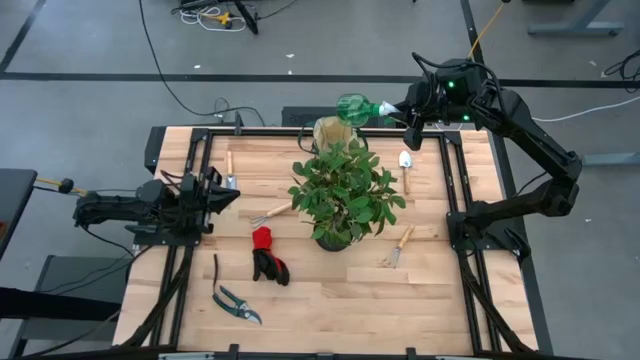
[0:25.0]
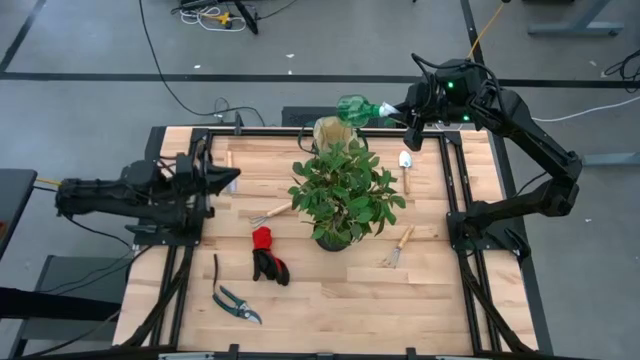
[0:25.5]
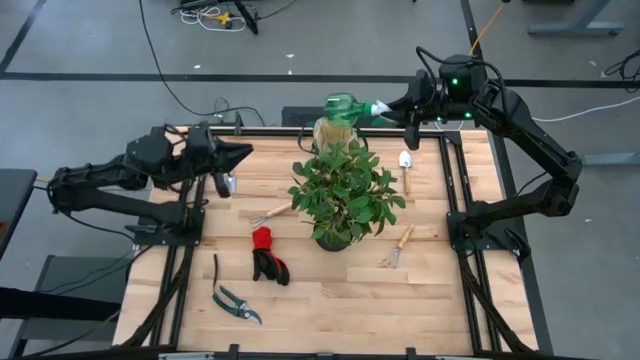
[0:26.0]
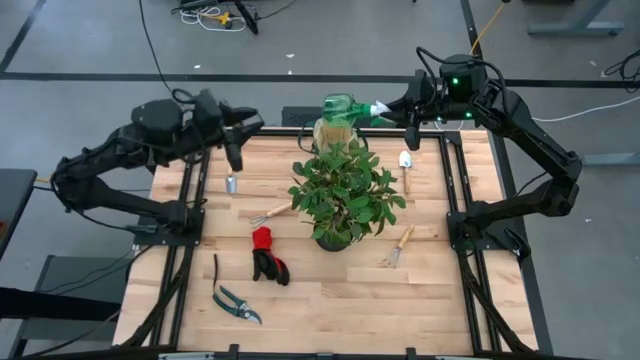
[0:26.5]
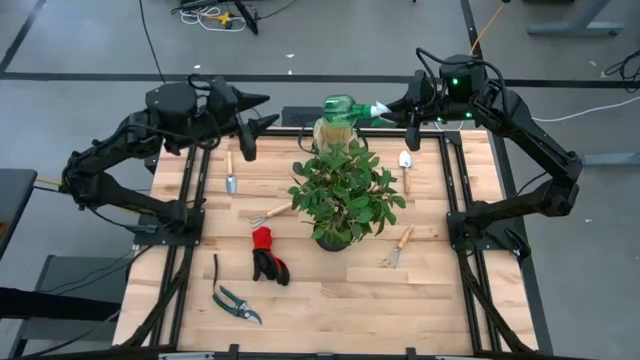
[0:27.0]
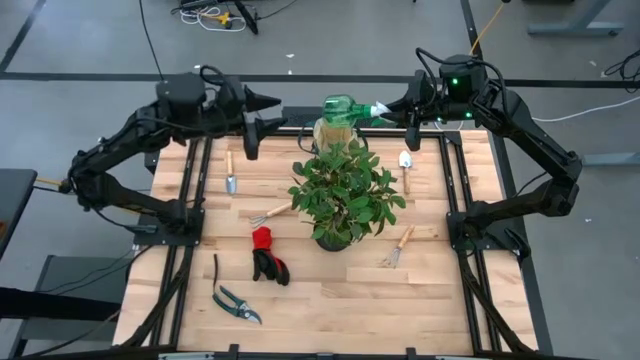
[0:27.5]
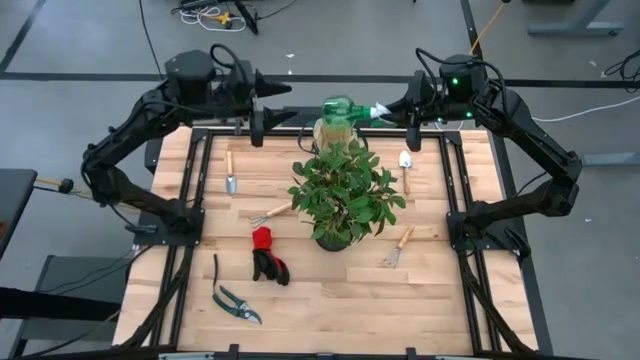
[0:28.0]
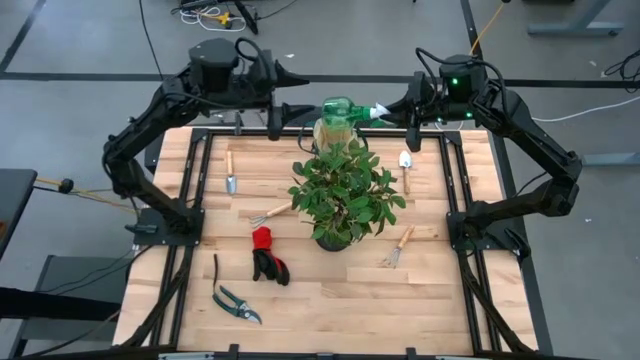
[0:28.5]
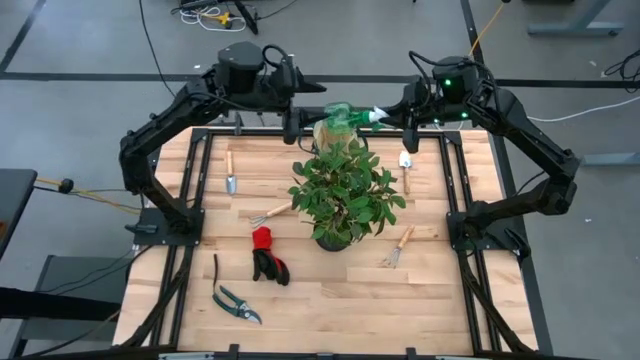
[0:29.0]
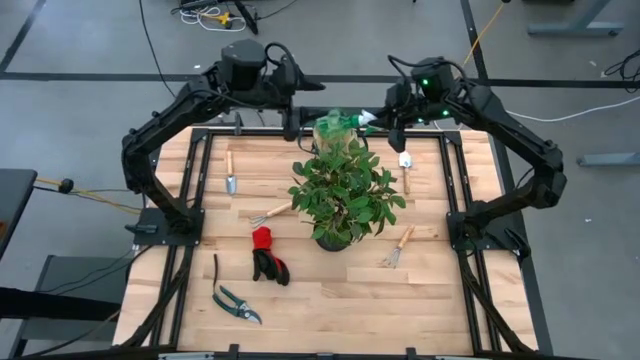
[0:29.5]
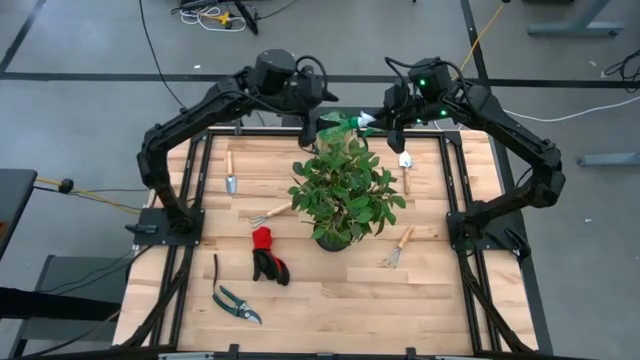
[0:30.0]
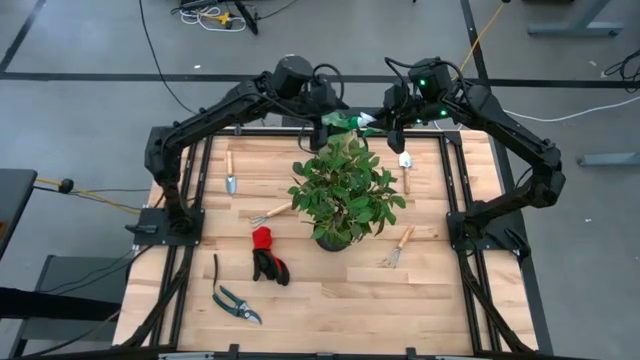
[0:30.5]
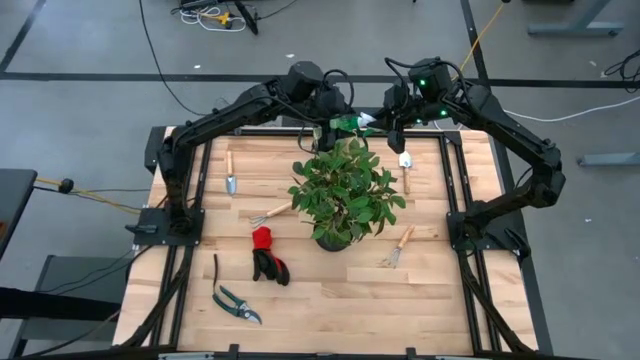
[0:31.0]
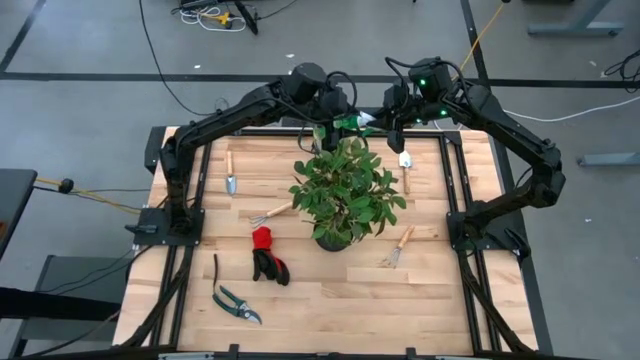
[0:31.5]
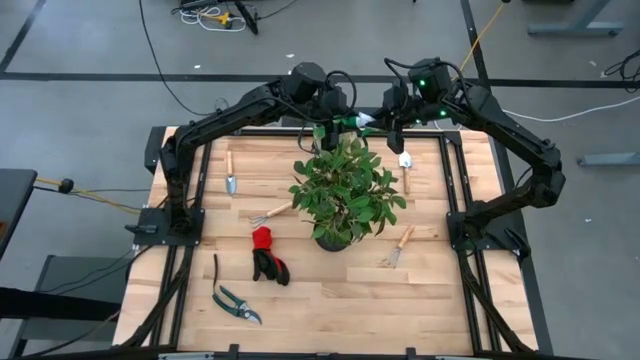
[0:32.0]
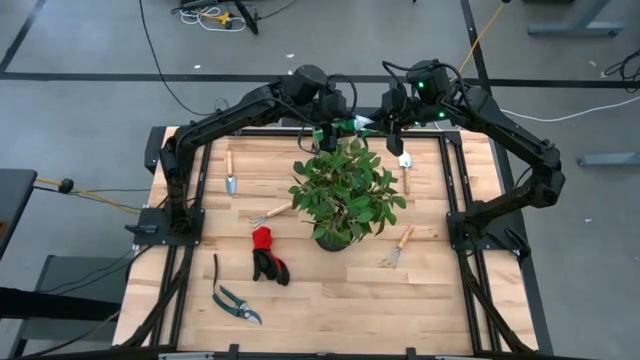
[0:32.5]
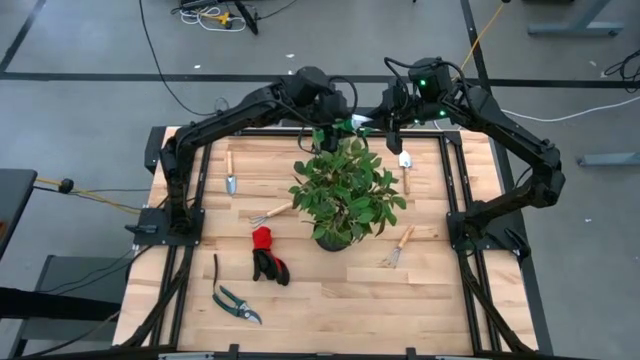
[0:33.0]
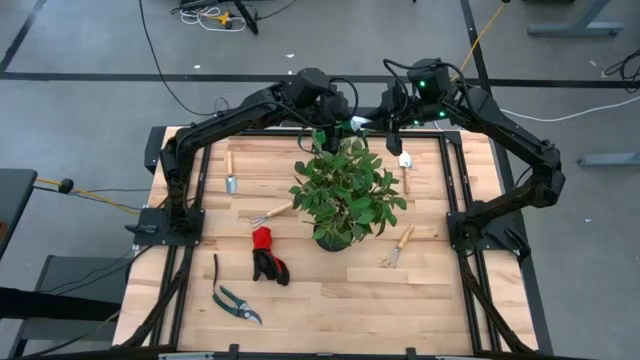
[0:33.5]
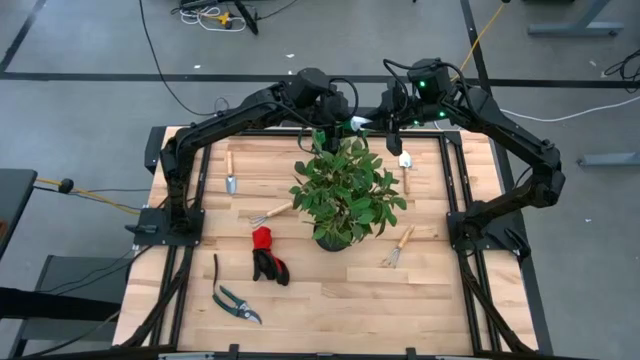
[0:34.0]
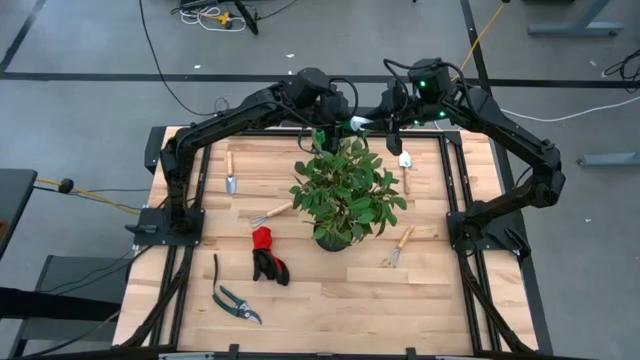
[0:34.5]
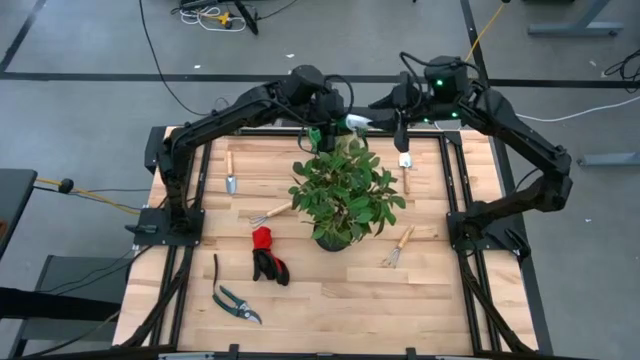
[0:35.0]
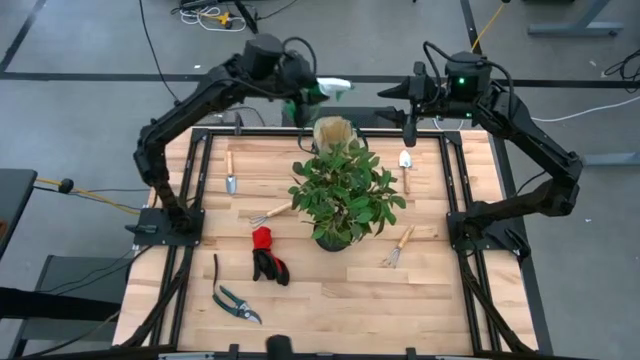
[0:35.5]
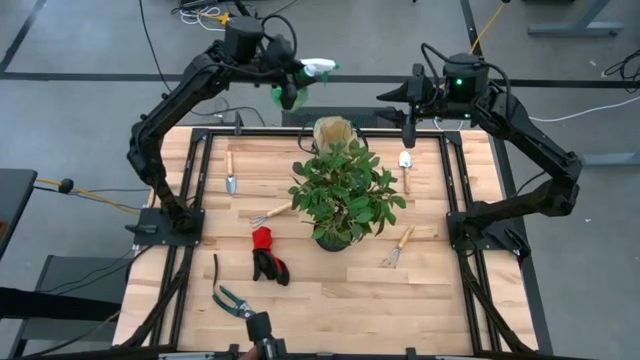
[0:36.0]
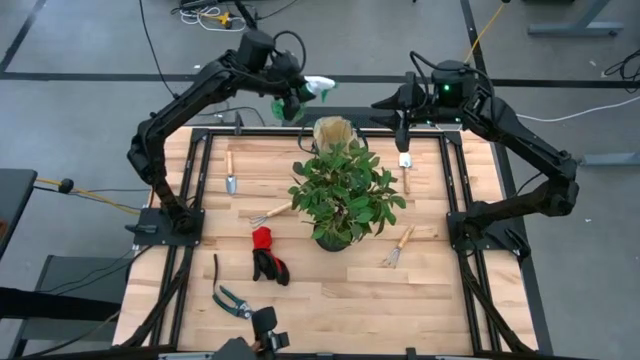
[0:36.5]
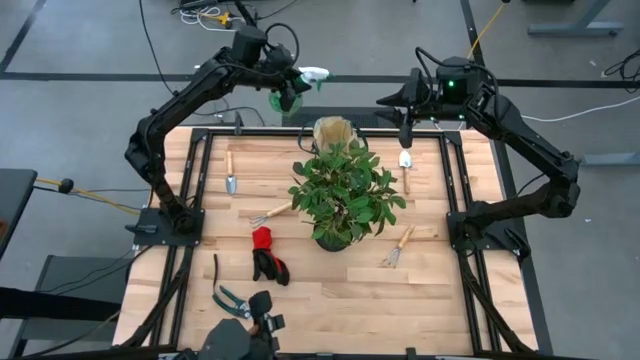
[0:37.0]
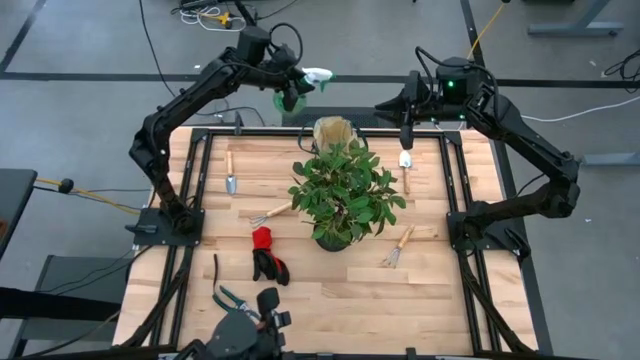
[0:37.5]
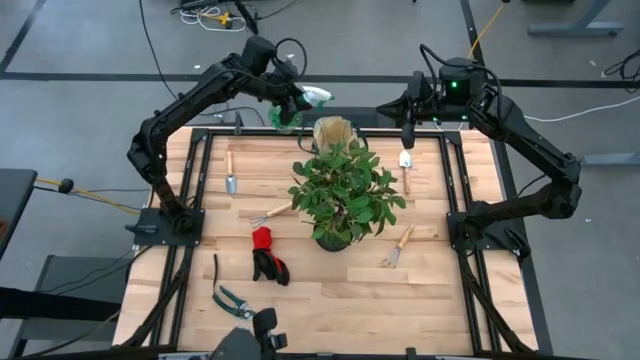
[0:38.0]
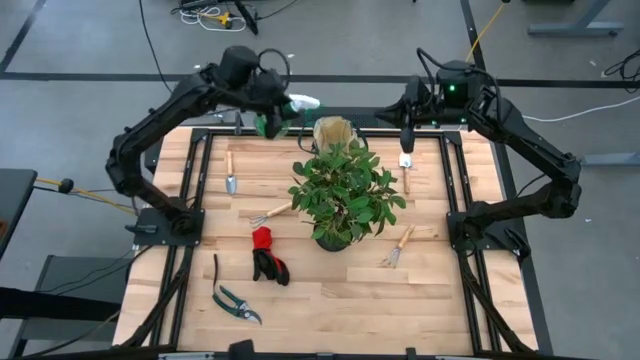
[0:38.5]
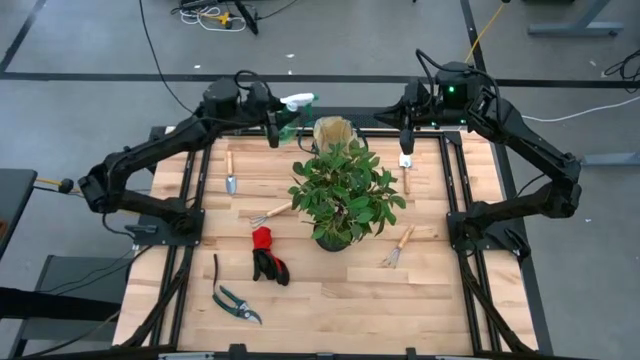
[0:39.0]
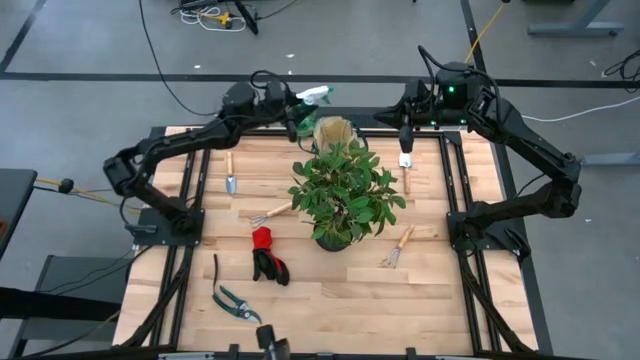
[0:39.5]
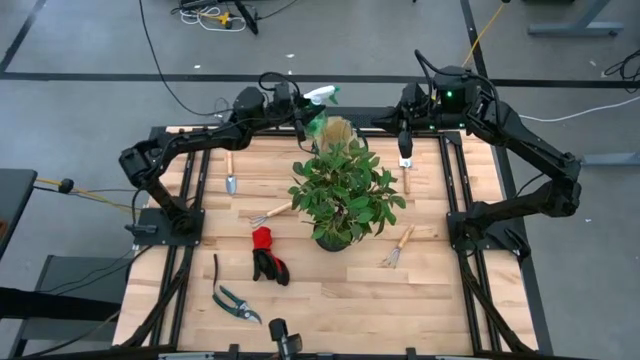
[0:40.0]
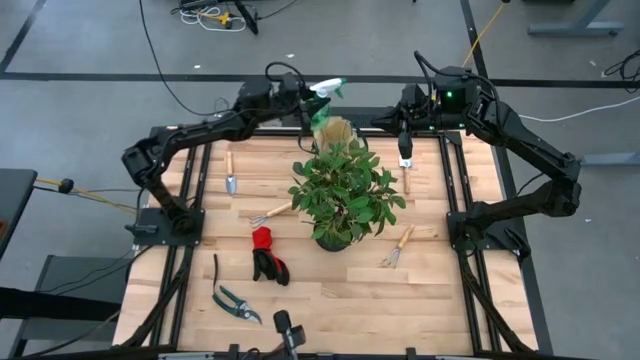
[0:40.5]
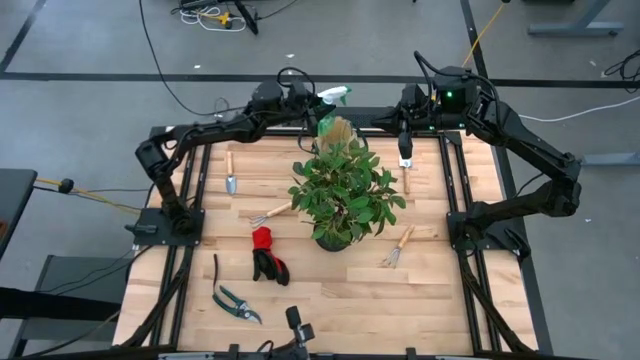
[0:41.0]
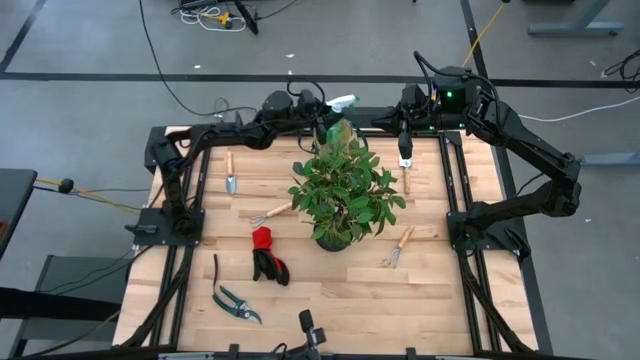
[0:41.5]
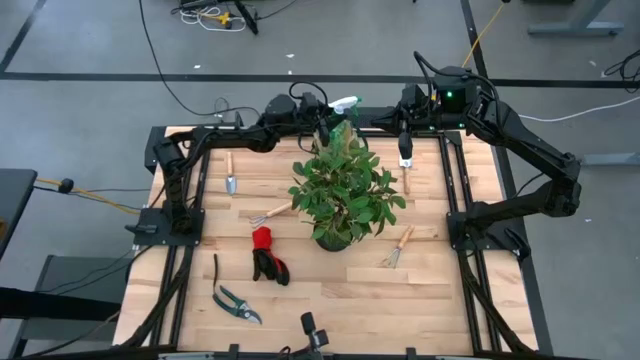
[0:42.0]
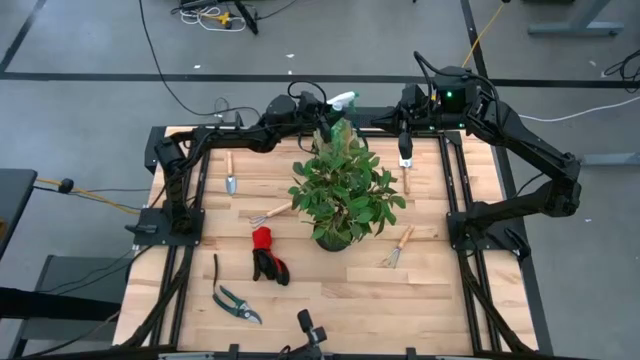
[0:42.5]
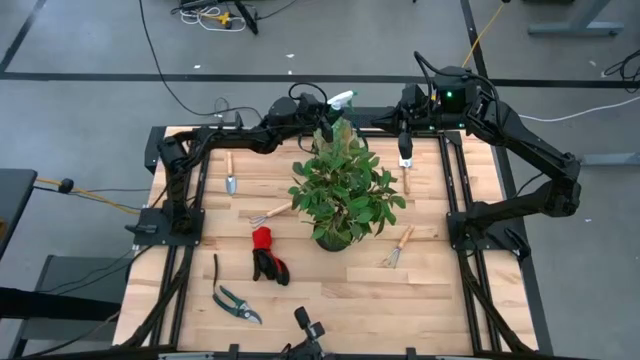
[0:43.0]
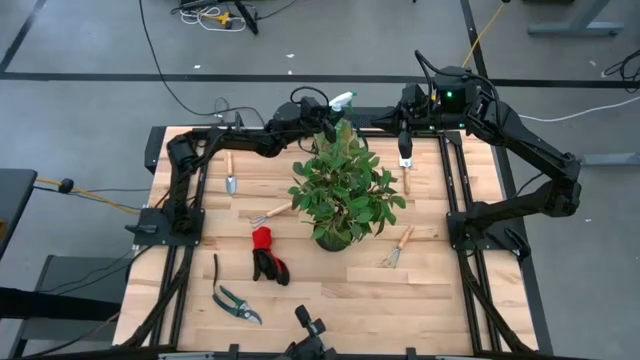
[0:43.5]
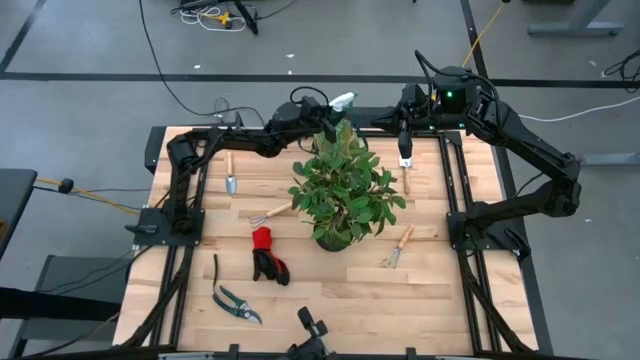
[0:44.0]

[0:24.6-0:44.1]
Task: Pick & Place Garden tools in Gardening bag
Put the green spray bottle into the gardening bag

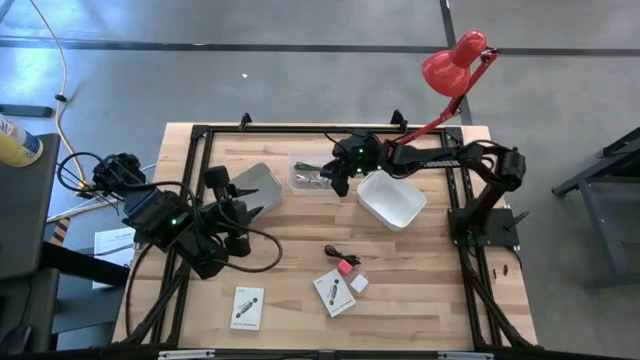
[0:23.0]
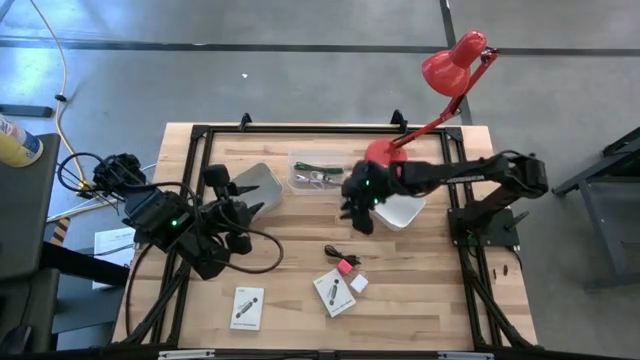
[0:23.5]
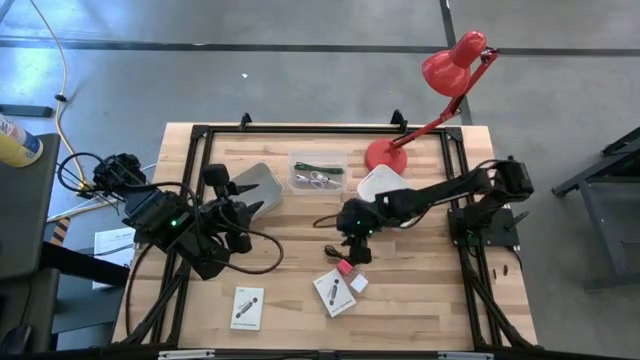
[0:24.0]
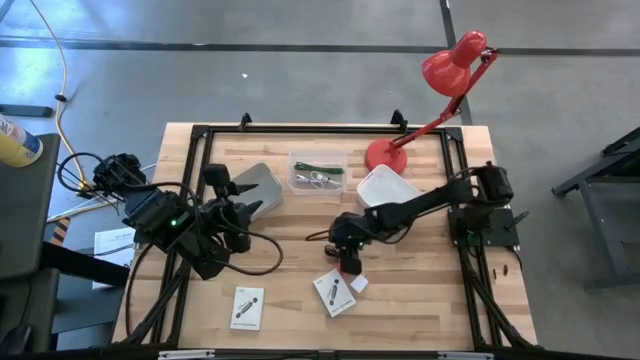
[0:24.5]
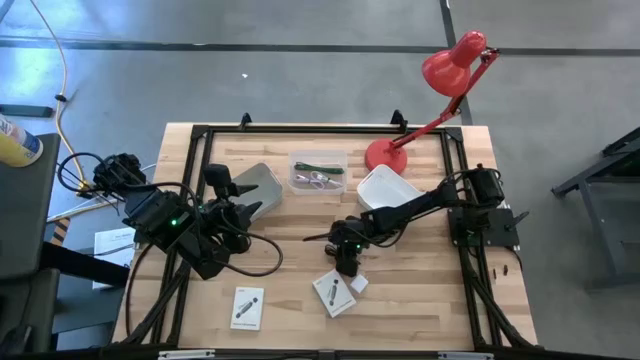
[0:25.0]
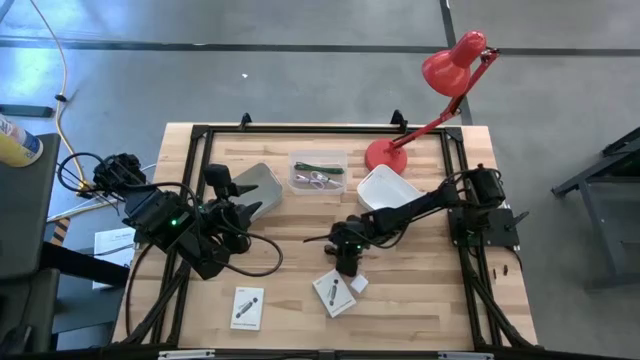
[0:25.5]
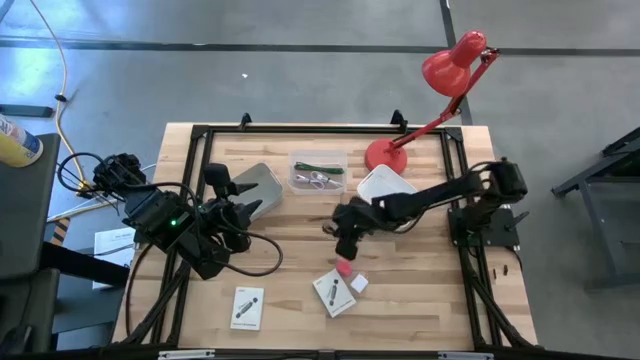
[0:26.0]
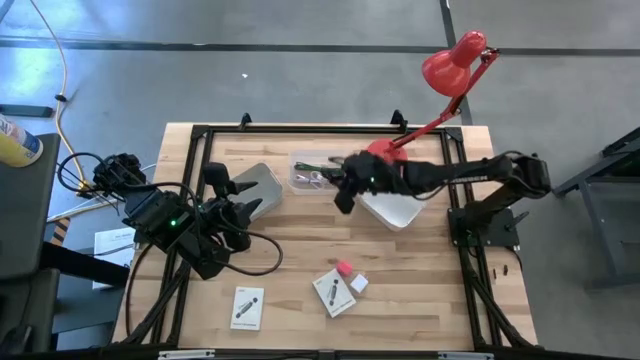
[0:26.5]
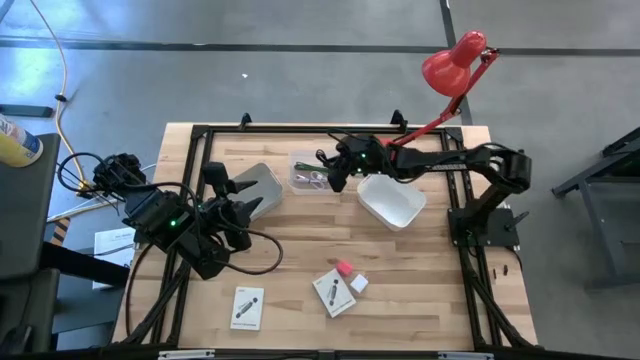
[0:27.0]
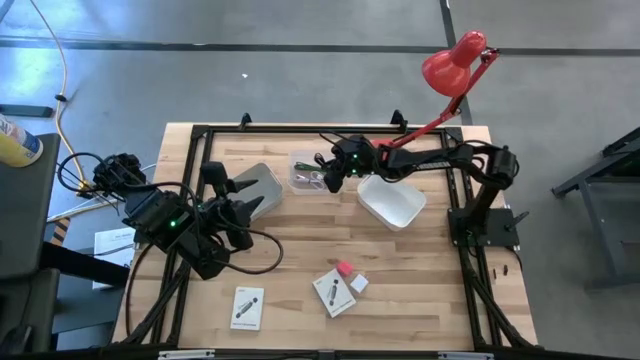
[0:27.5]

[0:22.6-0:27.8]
Task: Pick and place items into bin
Put the black charger cable into the transparent bin
